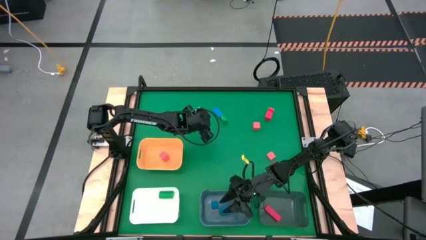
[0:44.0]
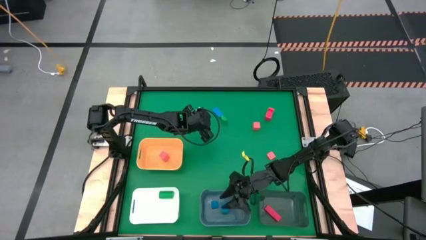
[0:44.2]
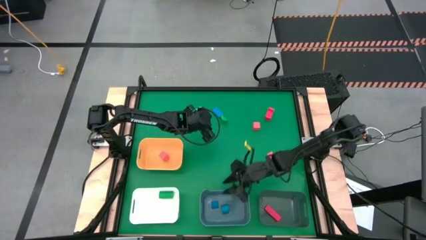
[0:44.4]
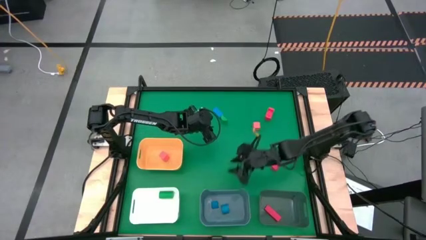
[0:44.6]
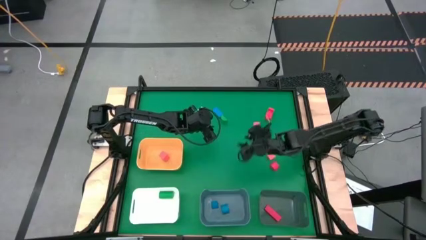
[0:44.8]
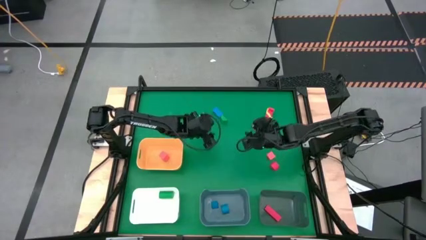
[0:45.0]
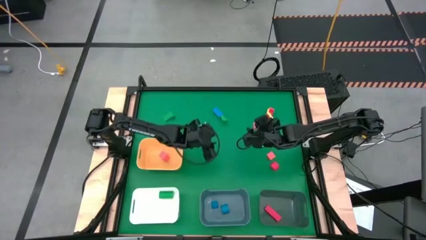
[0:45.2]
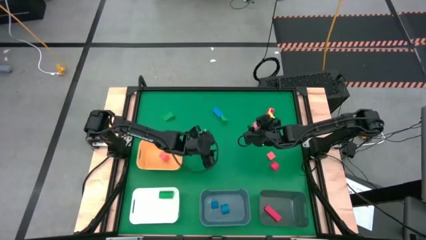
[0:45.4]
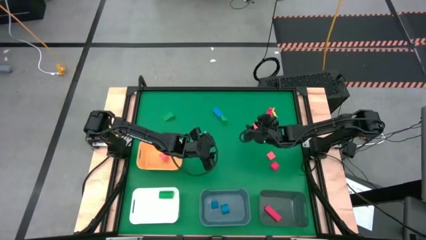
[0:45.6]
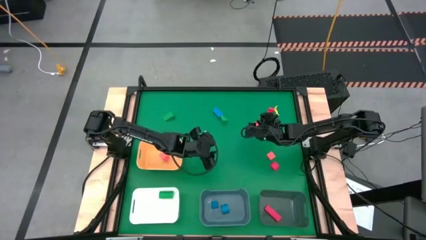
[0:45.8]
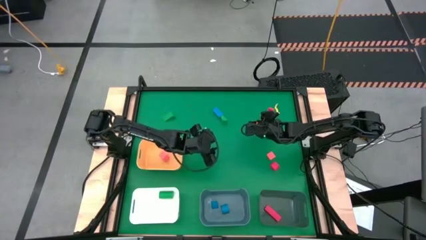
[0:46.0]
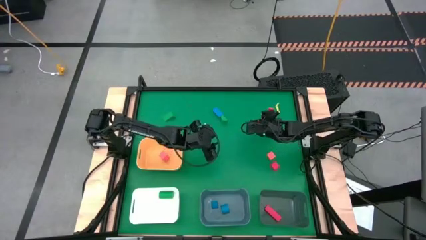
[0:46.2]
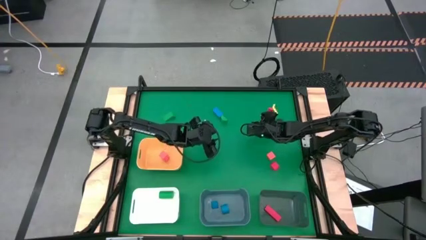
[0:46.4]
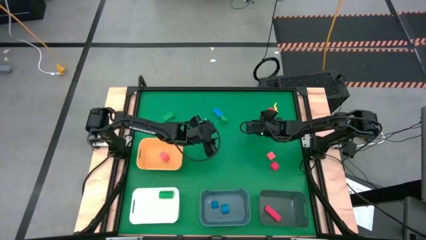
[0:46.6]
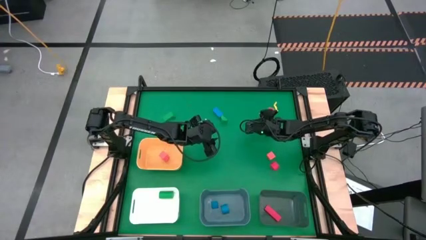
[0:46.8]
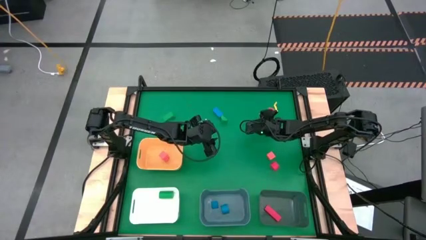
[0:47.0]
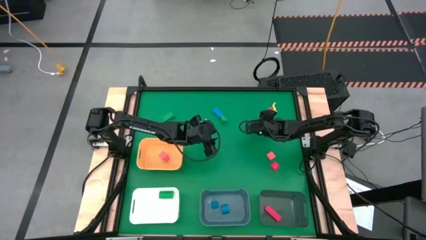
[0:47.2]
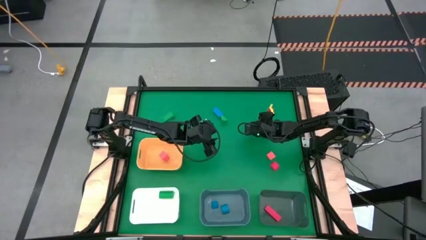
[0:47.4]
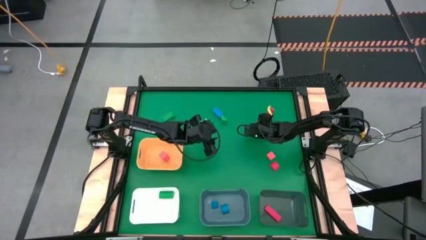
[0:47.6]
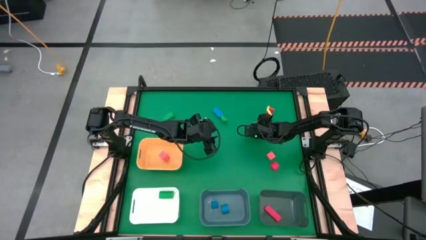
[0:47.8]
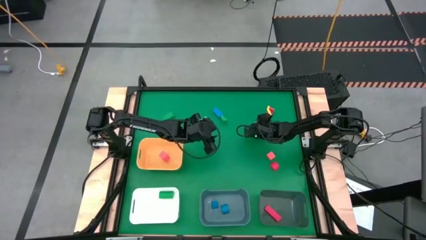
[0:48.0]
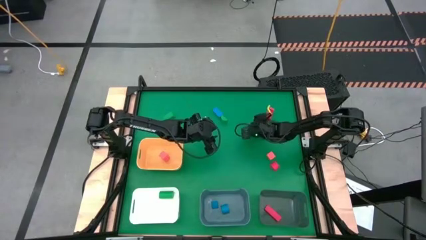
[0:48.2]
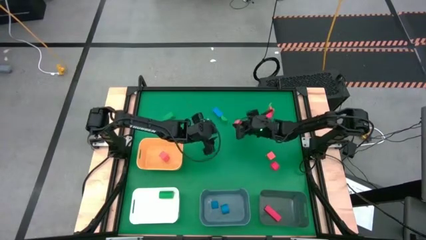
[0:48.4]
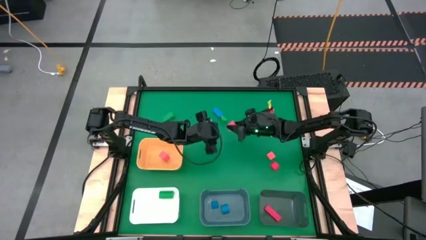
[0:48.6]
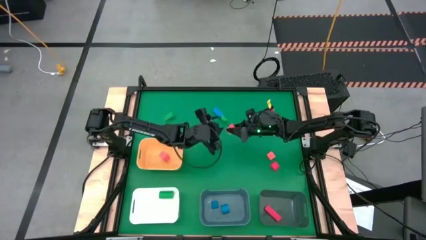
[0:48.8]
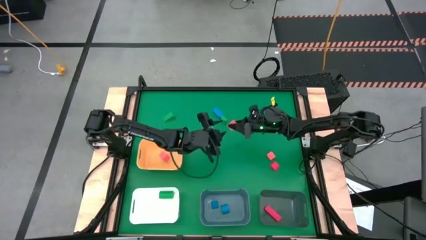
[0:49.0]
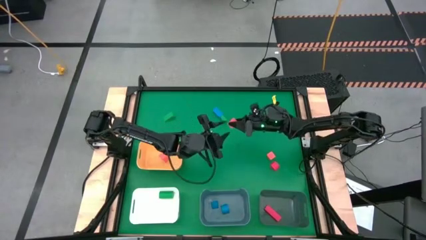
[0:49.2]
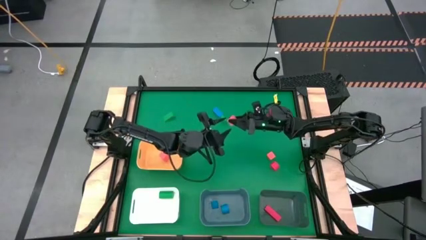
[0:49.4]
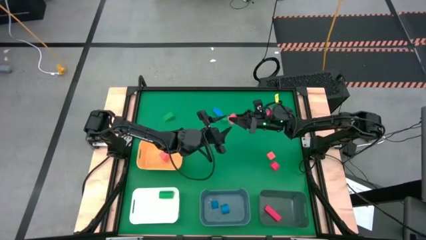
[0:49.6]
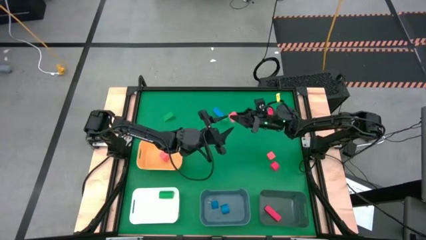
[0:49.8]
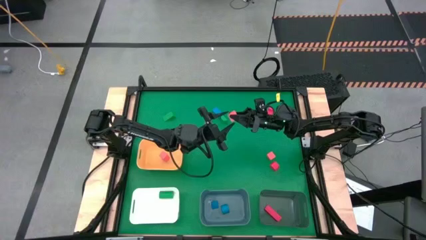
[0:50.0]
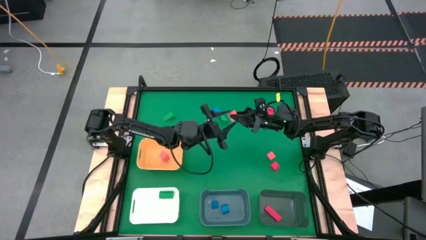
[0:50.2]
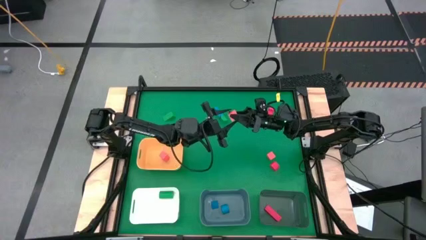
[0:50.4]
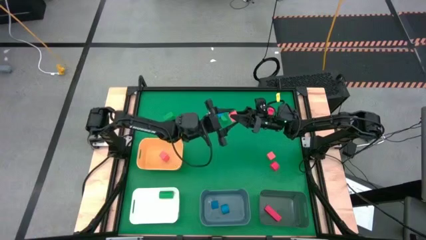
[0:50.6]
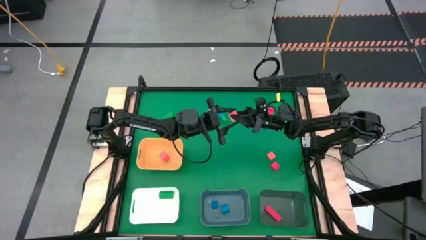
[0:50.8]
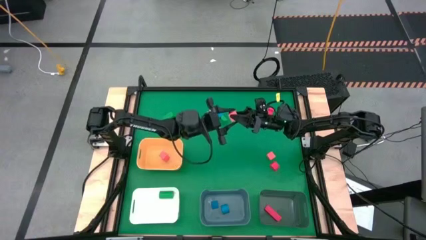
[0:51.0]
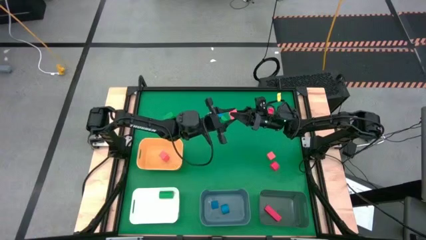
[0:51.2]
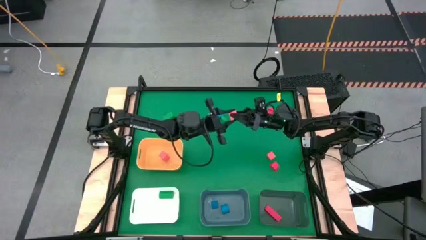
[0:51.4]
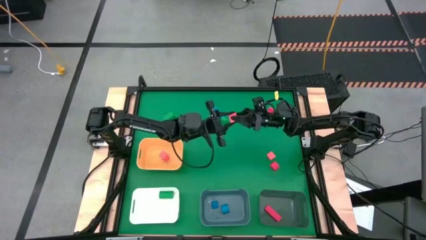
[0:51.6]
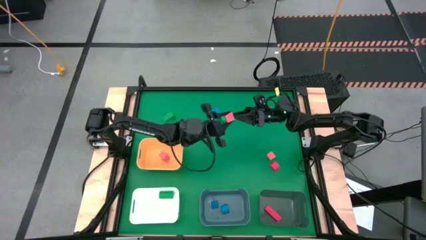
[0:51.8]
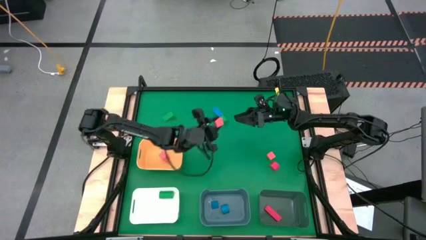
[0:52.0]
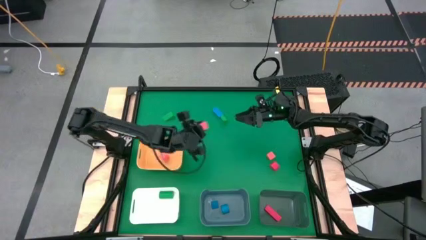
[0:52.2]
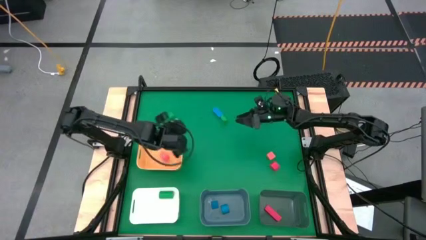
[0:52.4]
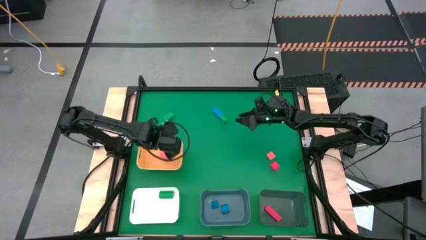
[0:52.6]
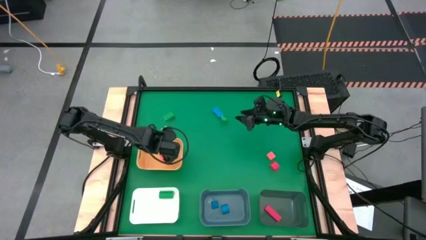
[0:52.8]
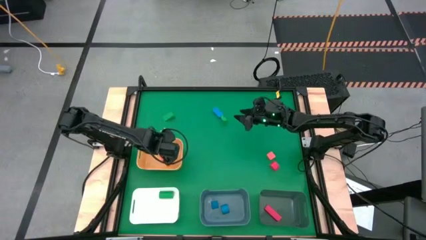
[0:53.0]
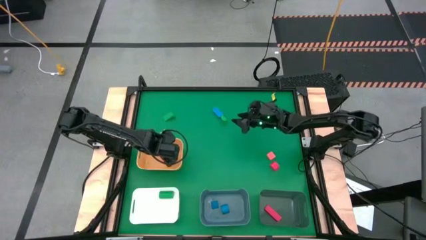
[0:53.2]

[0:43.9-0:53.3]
Task: Sort & place blocks by color
Put the top orange block into the yellow bin

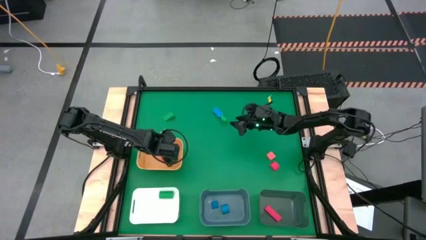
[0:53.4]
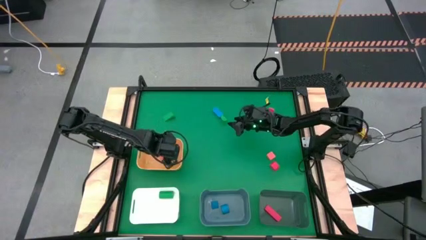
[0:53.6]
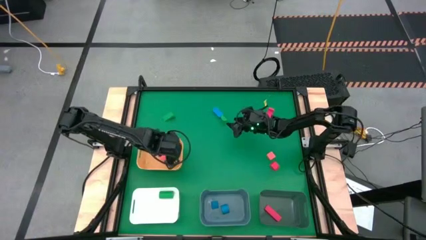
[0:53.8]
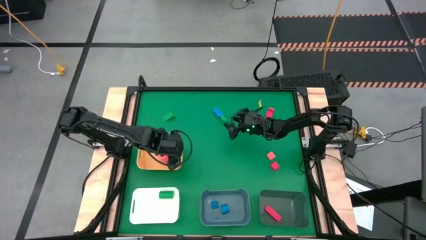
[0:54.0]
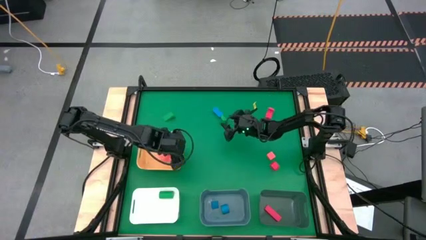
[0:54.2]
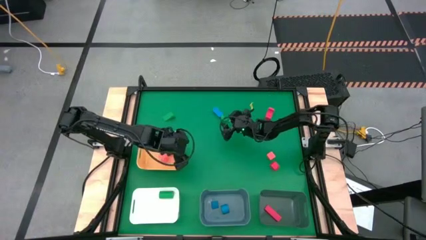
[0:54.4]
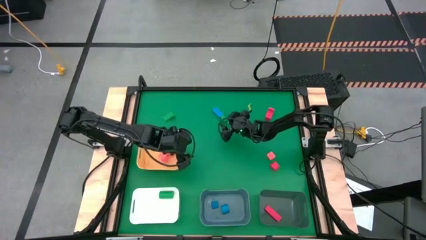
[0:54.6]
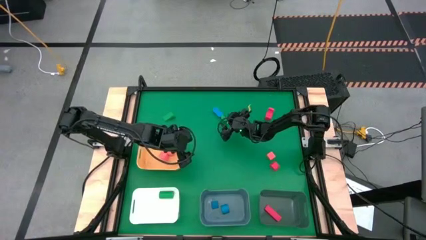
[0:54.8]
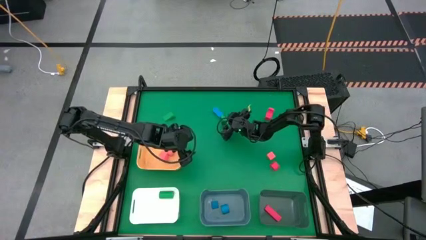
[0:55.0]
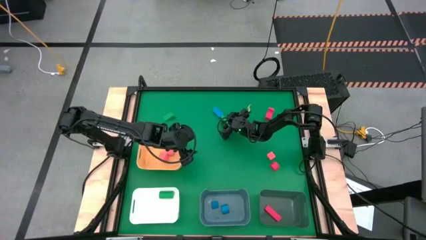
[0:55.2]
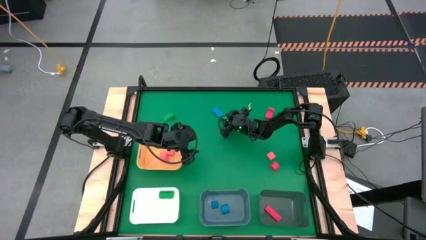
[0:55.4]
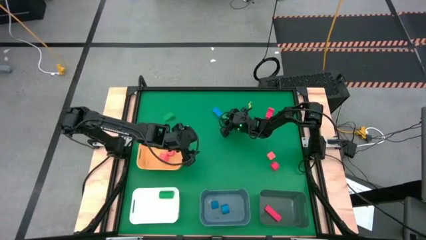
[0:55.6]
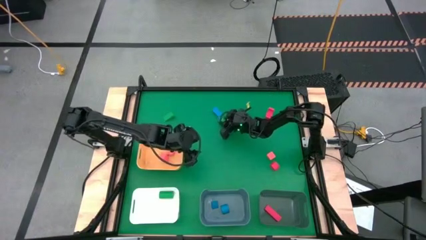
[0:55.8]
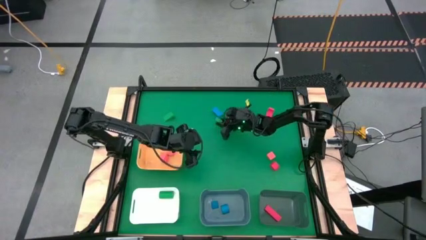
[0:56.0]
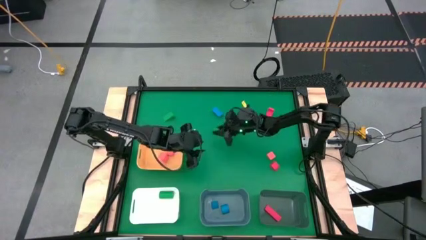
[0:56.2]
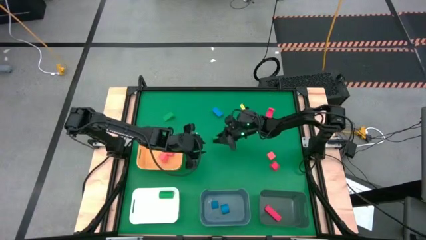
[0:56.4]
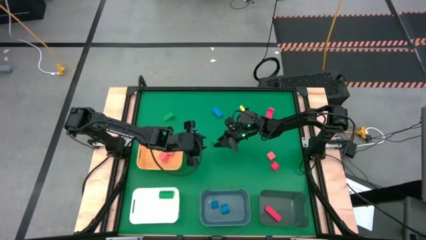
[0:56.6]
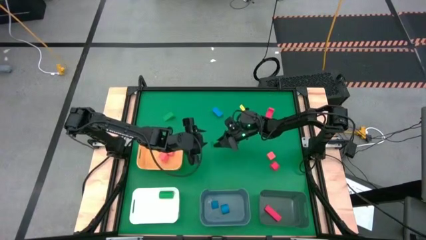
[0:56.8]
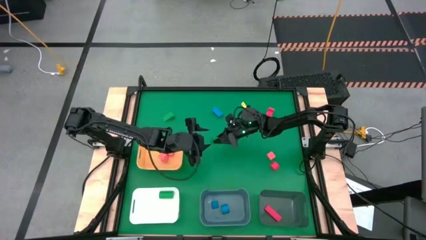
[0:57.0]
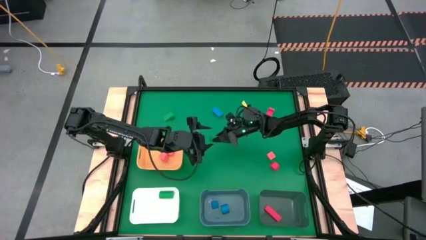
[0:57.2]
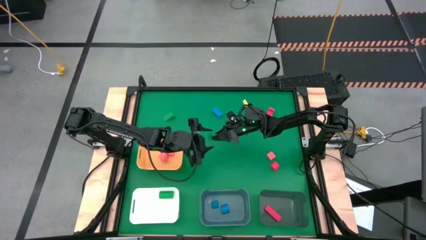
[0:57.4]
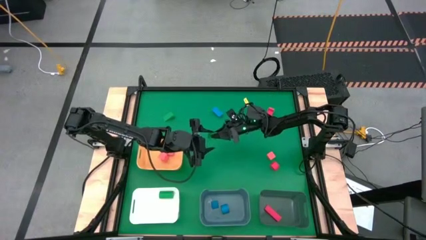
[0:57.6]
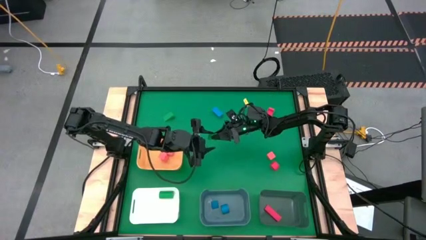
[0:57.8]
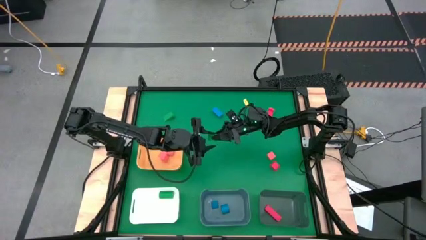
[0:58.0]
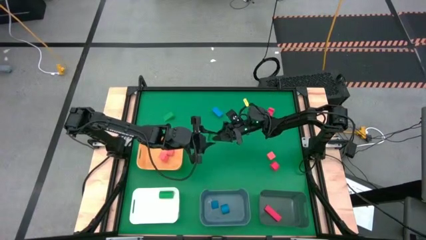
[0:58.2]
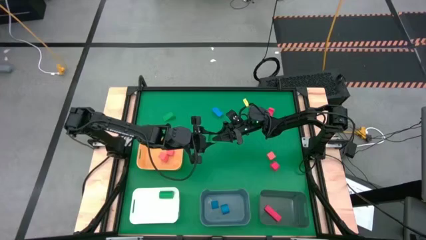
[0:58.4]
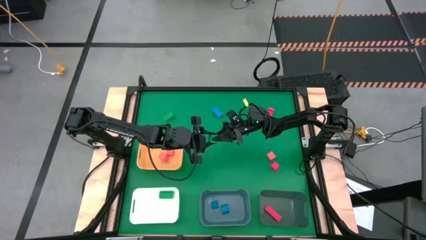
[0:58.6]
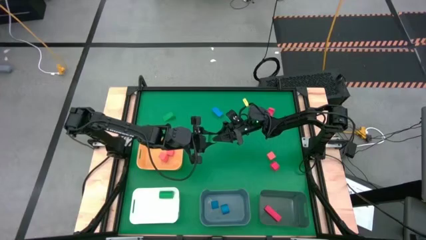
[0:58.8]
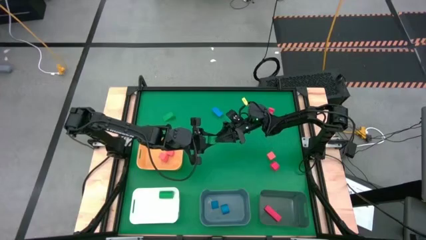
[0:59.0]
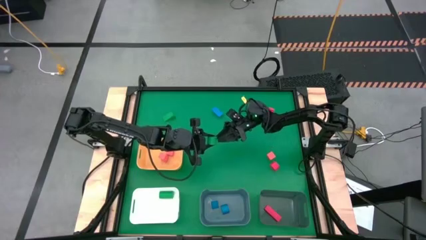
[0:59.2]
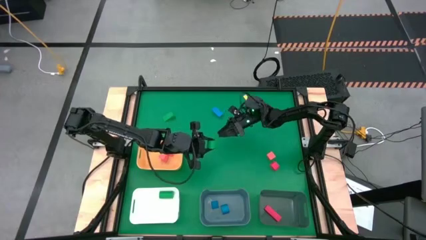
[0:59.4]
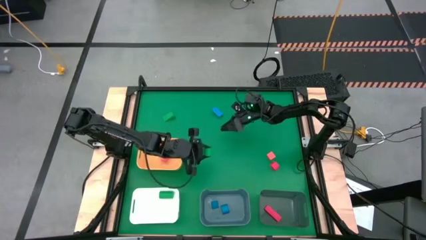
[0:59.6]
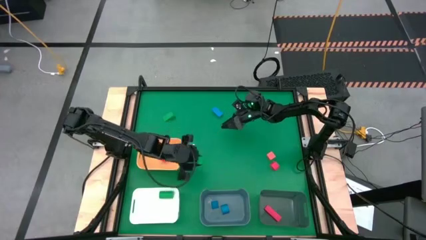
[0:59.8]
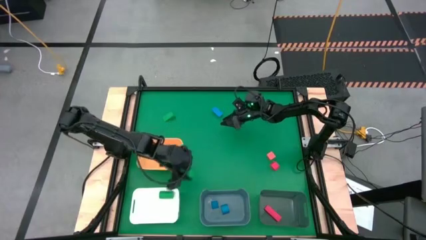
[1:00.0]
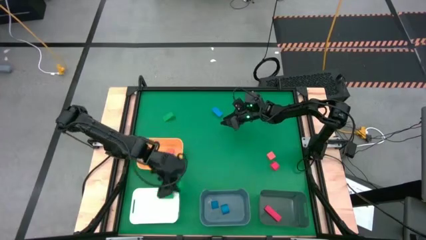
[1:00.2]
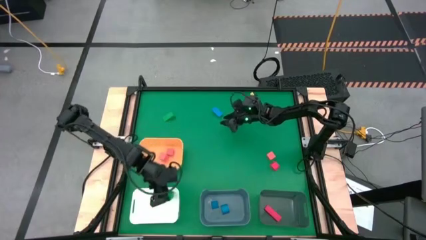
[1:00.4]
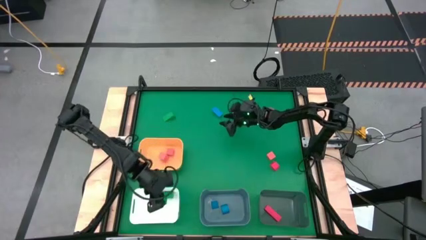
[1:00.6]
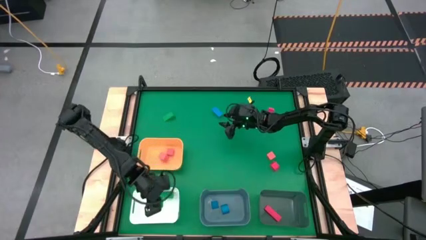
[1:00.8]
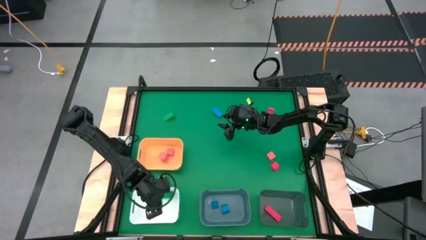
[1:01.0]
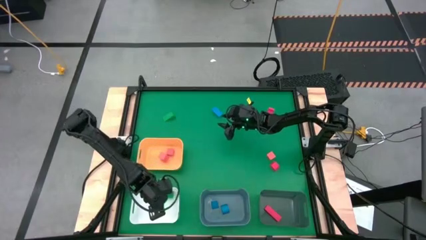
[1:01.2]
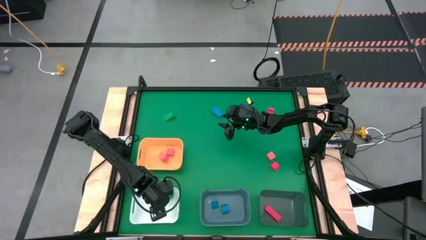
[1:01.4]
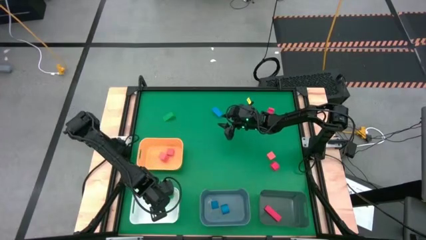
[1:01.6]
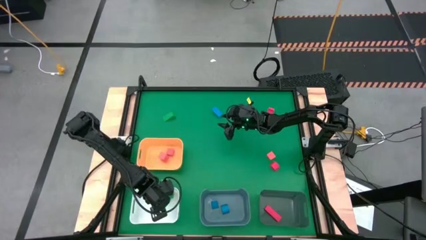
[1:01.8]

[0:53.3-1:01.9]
Put the right green block into the white bin
